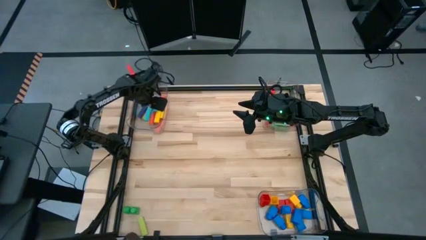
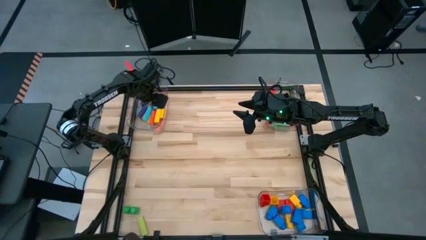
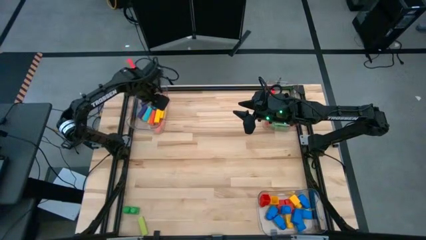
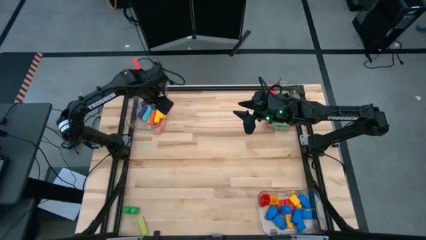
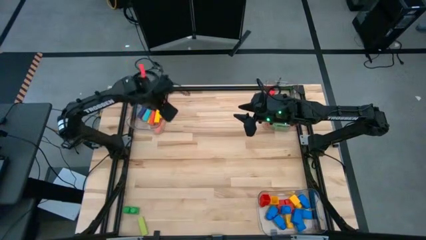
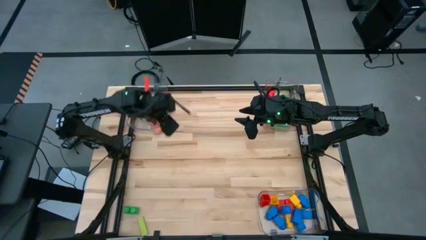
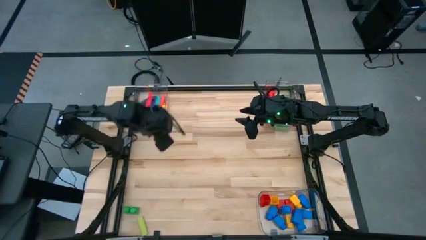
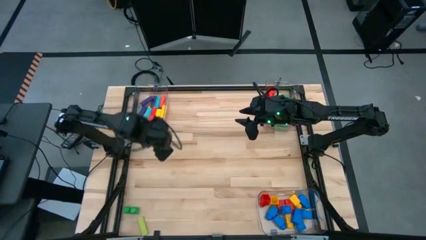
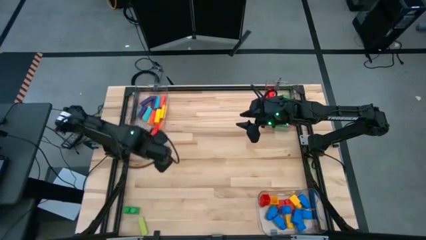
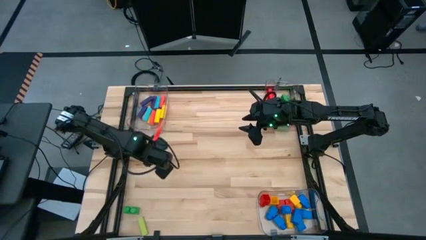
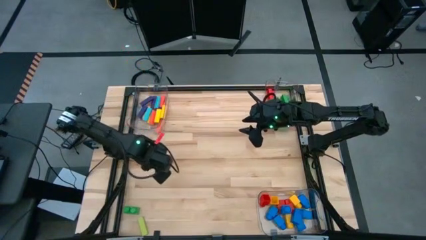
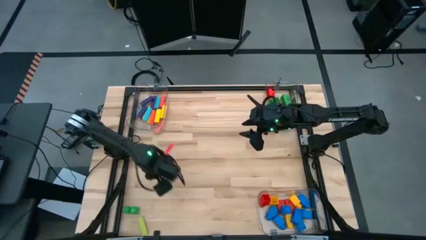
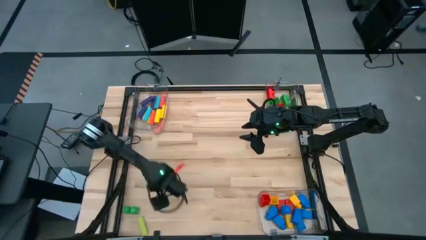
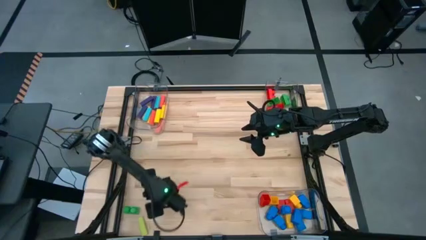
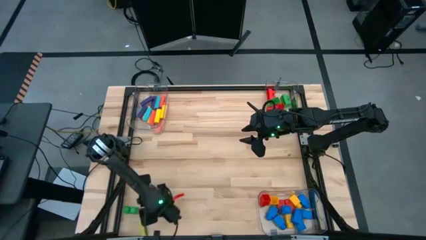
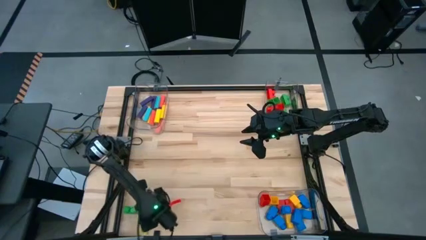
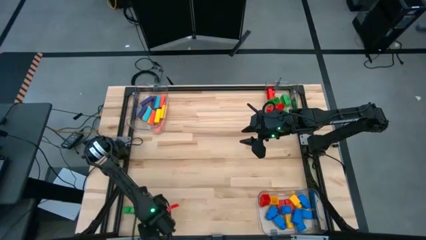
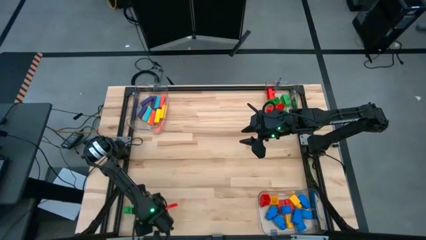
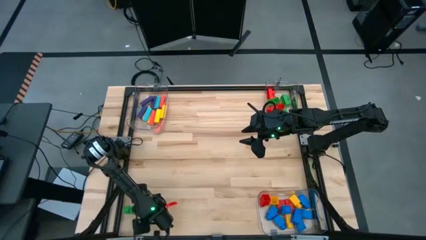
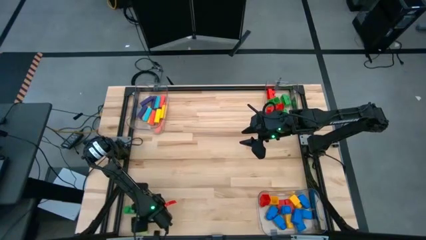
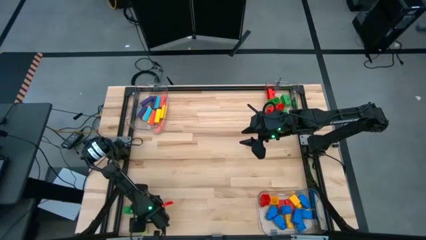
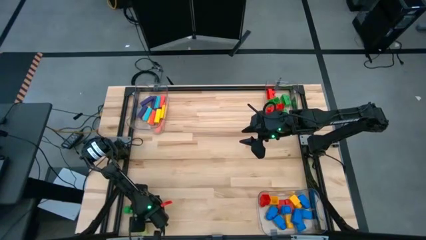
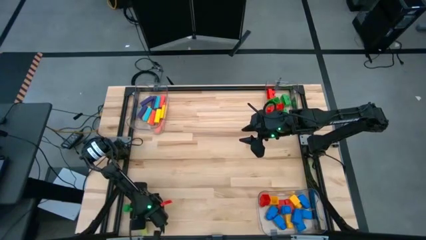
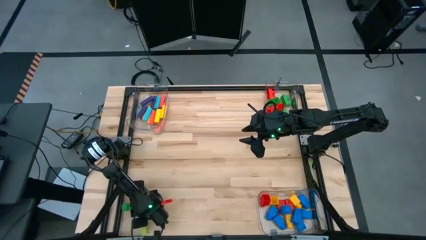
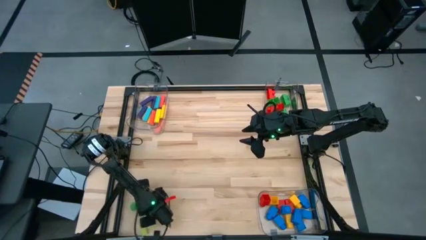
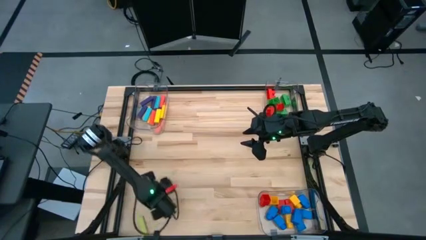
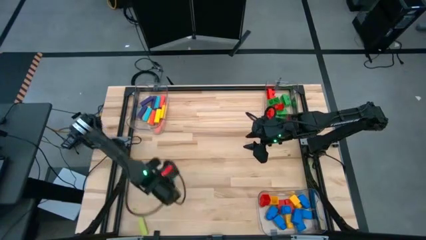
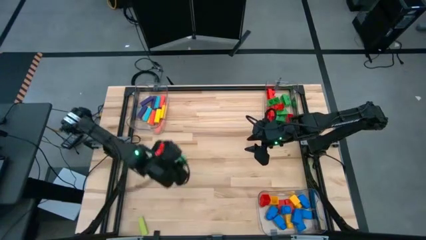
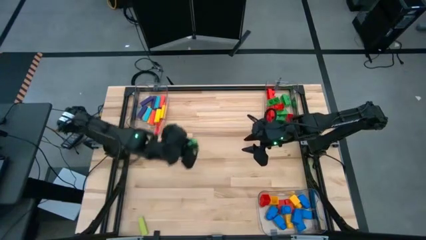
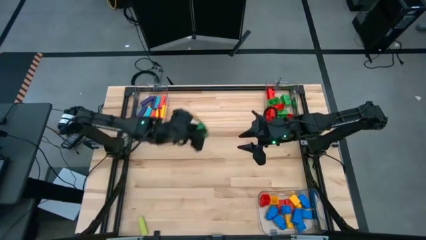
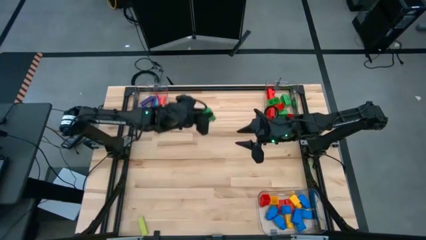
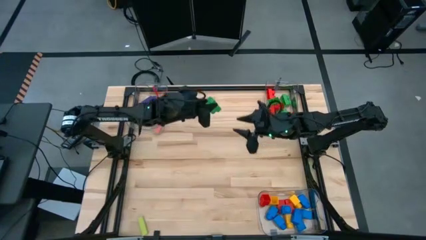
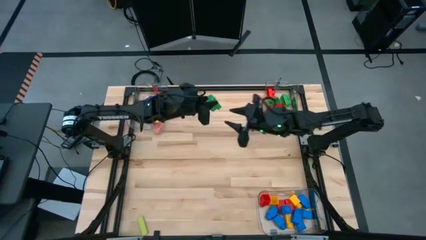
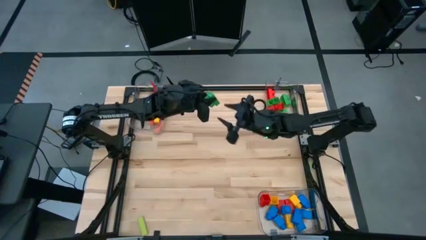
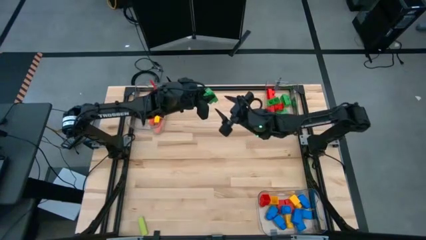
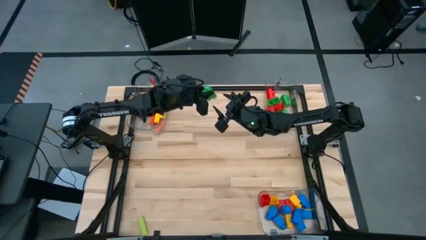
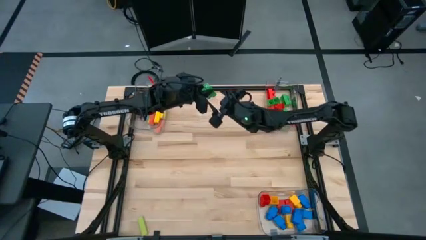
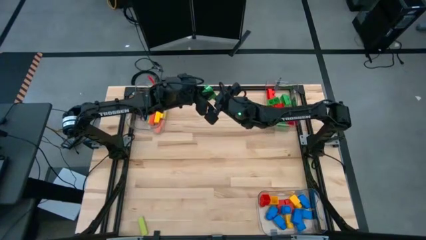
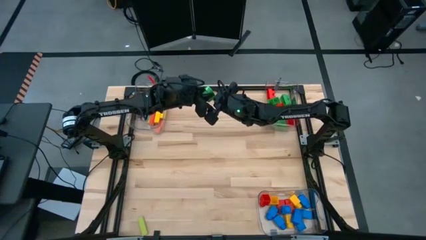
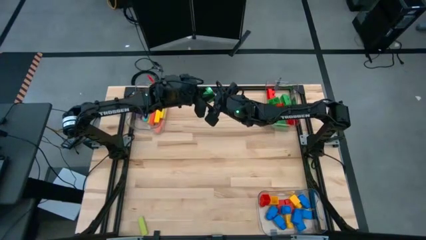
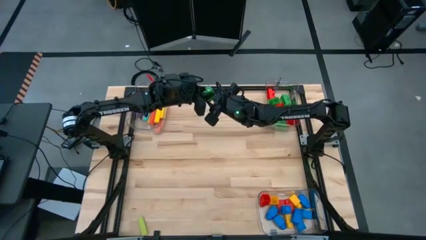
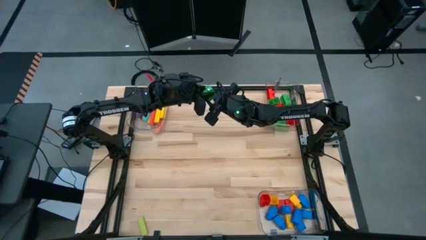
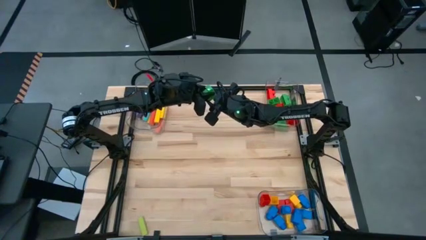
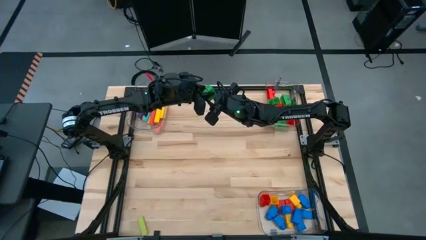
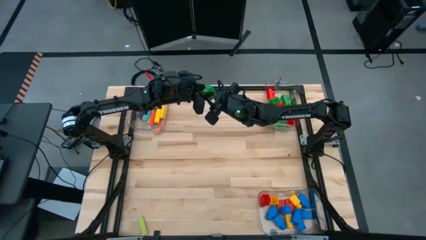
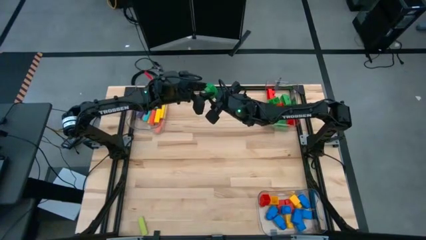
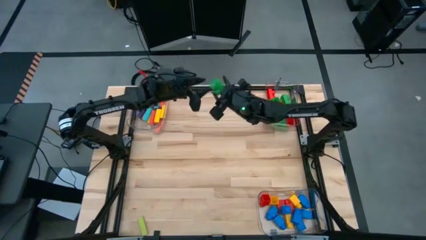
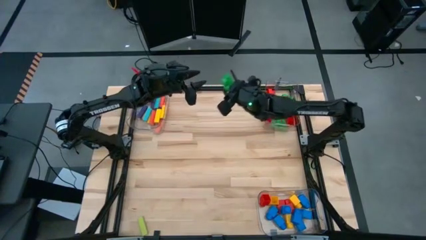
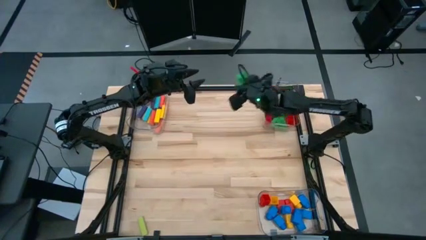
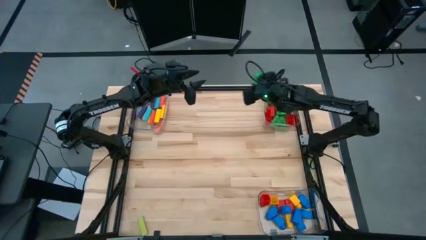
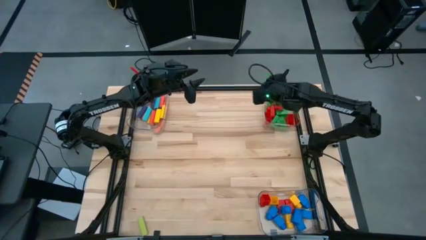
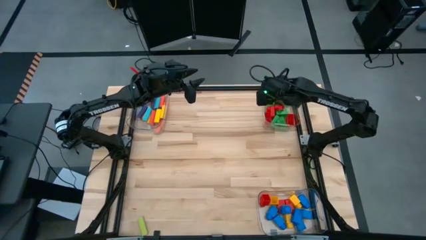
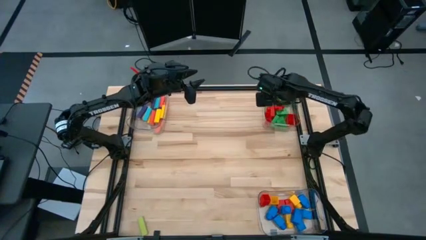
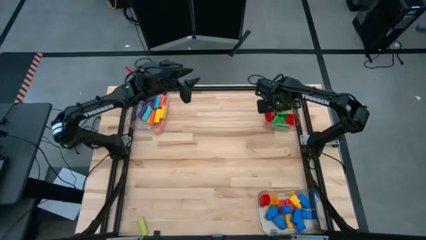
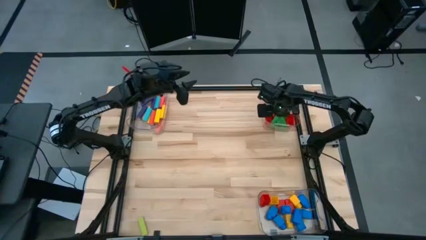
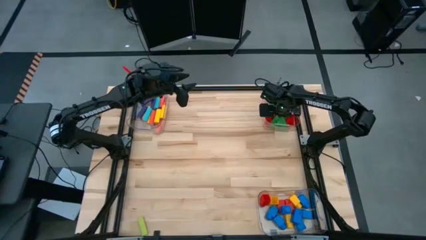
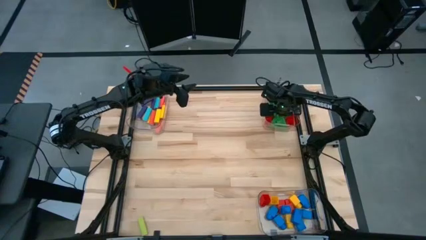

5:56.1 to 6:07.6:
Task: Sort blocks by size
Put the green 2 stud game piece into the top right transparent bin

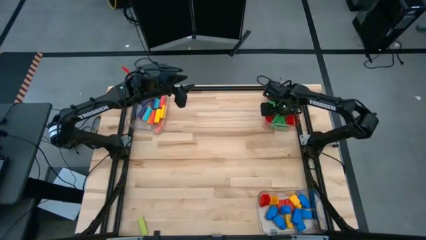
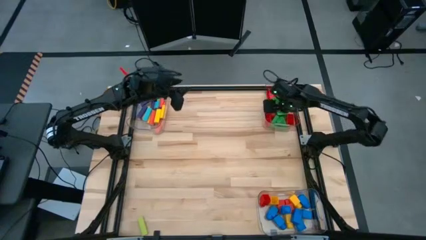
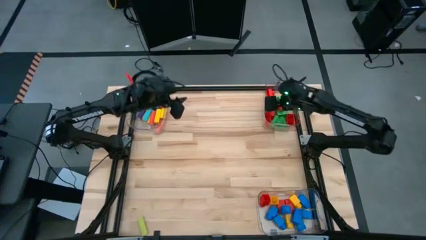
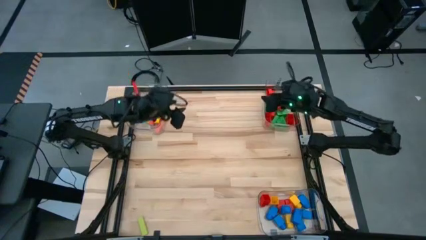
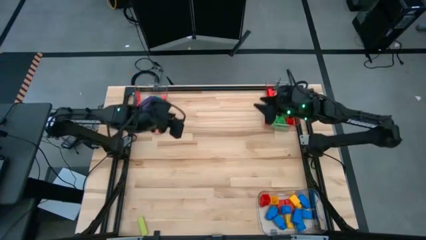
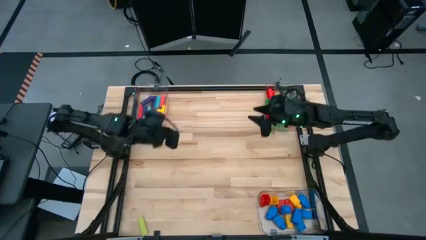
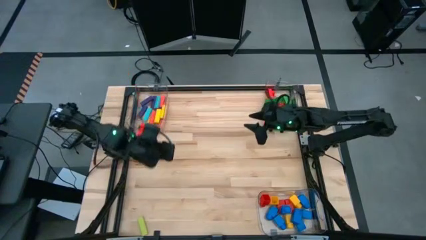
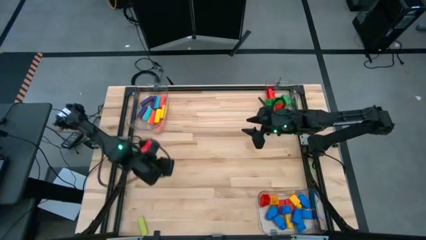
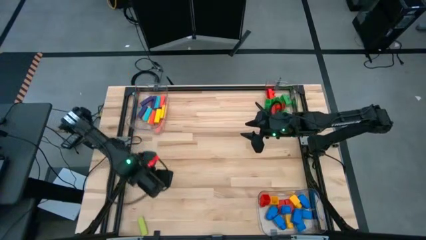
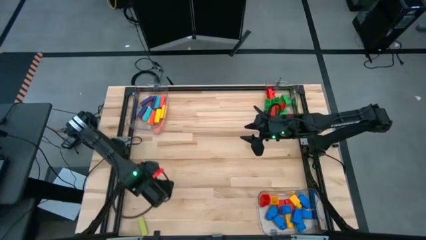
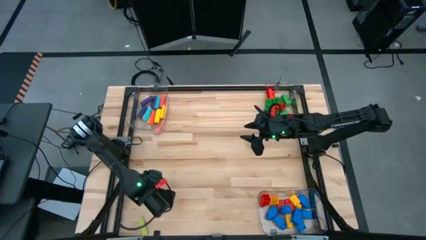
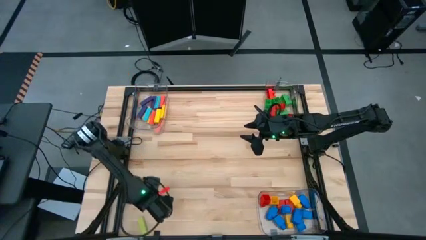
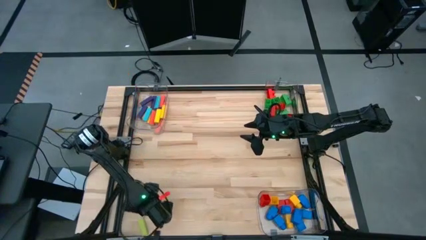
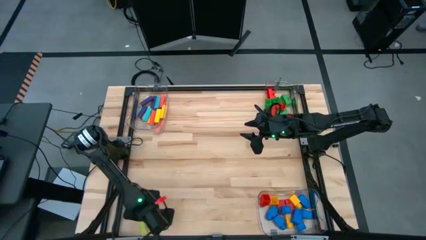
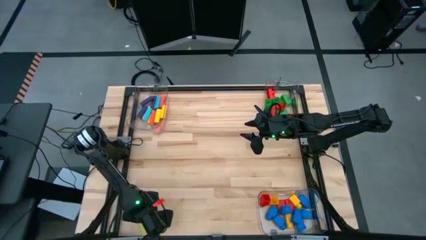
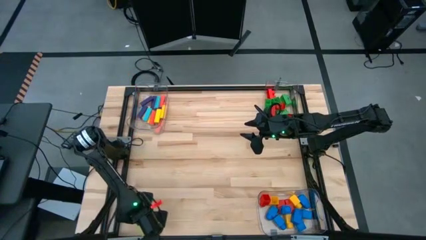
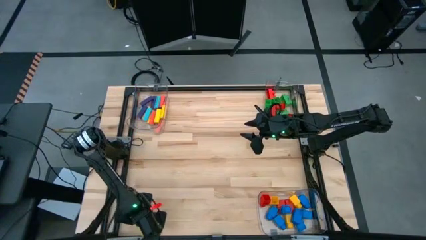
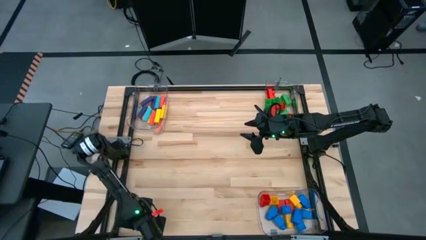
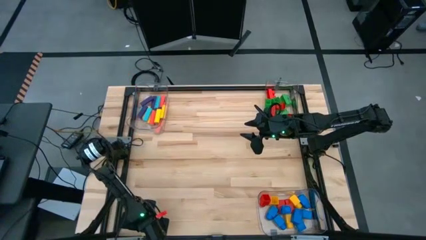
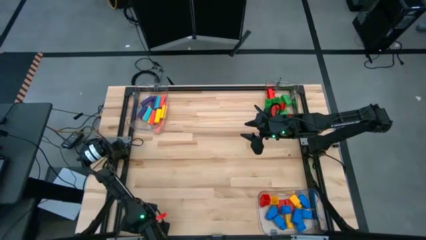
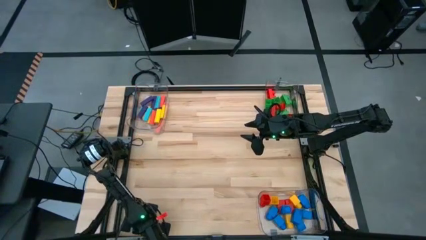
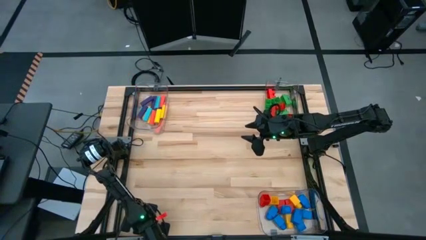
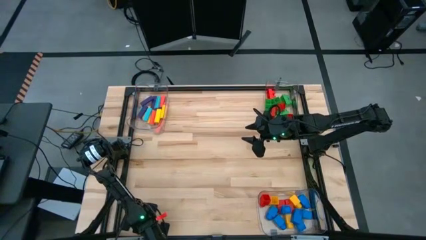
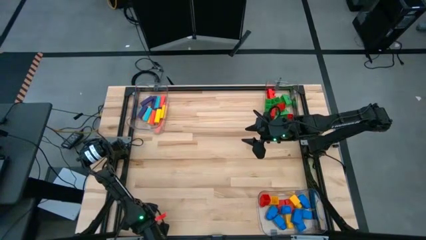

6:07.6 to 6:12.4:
Put the light green block into the top left transparent bin
